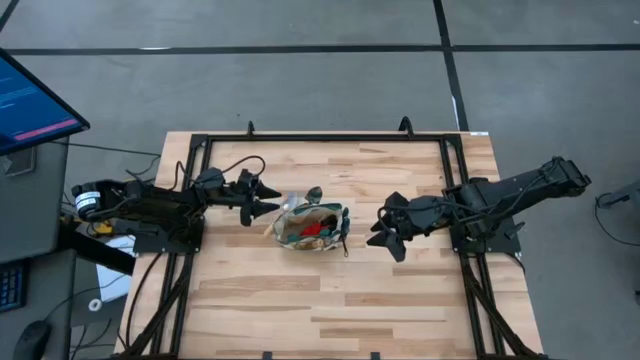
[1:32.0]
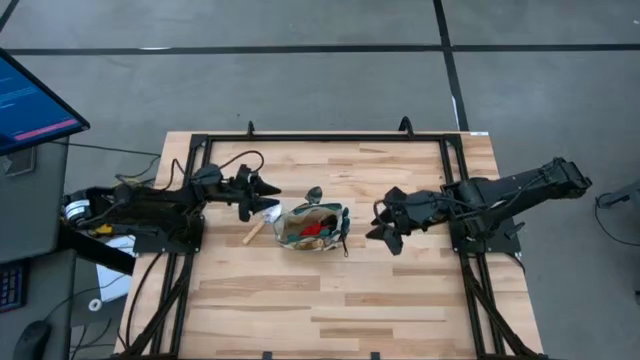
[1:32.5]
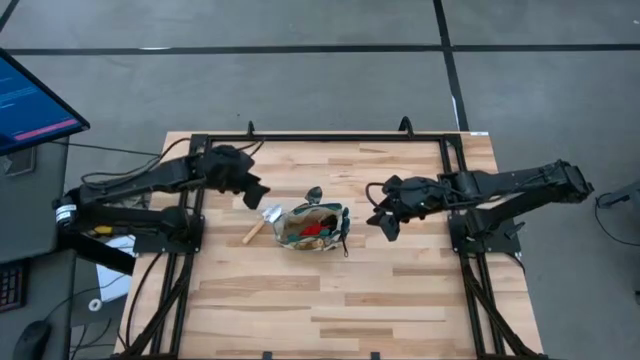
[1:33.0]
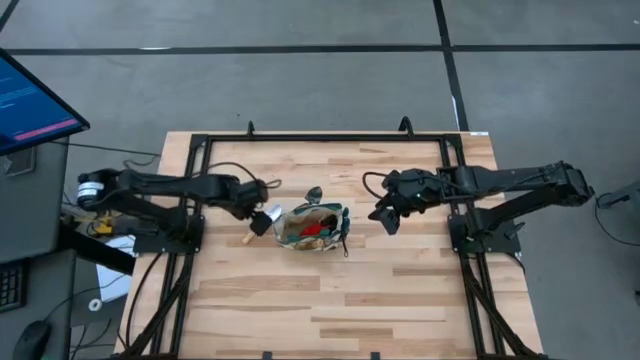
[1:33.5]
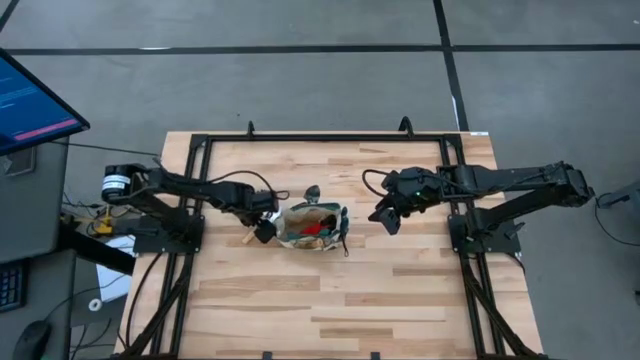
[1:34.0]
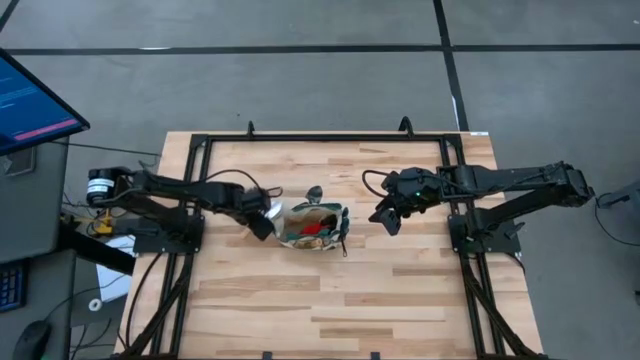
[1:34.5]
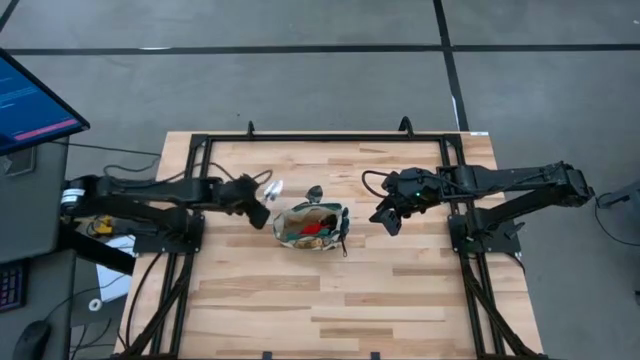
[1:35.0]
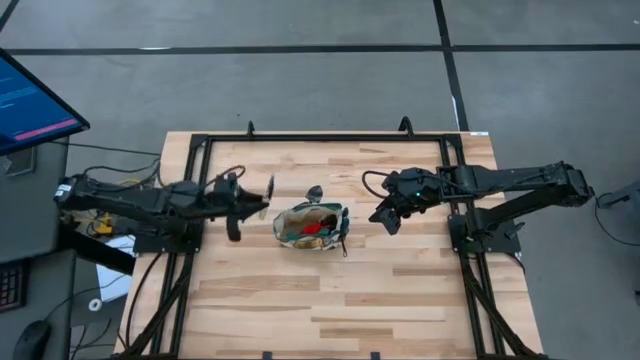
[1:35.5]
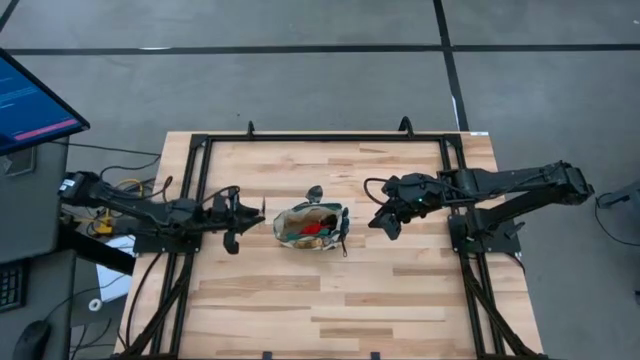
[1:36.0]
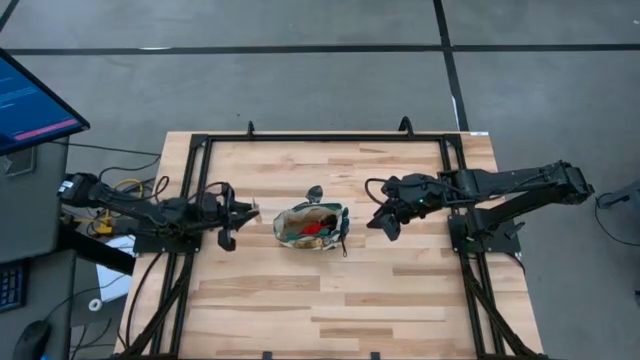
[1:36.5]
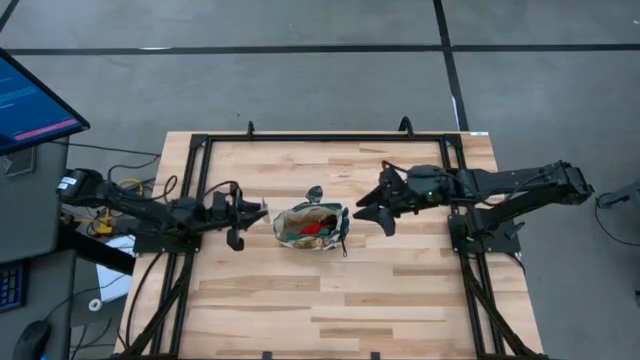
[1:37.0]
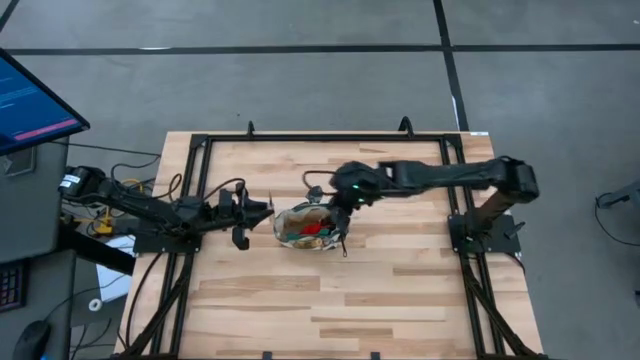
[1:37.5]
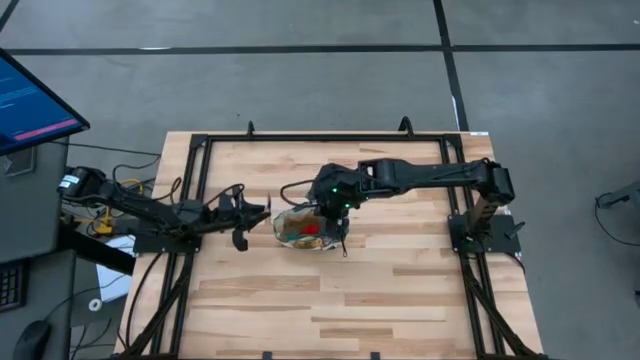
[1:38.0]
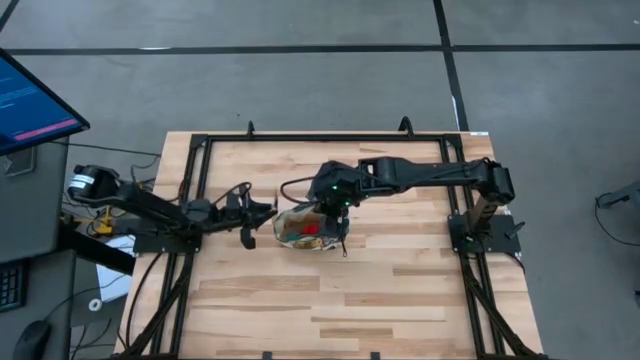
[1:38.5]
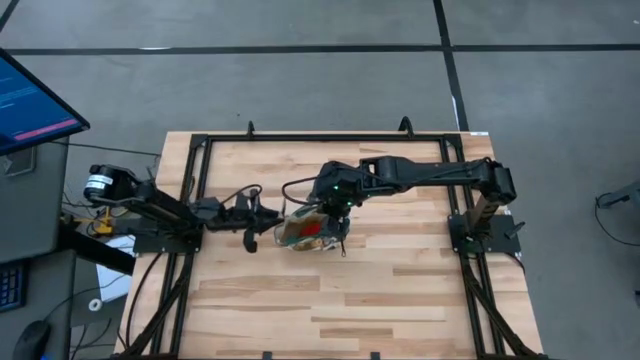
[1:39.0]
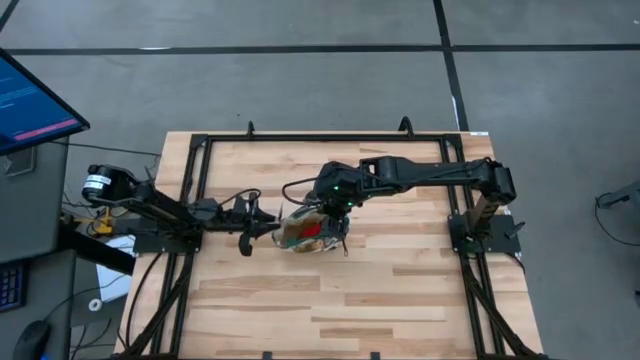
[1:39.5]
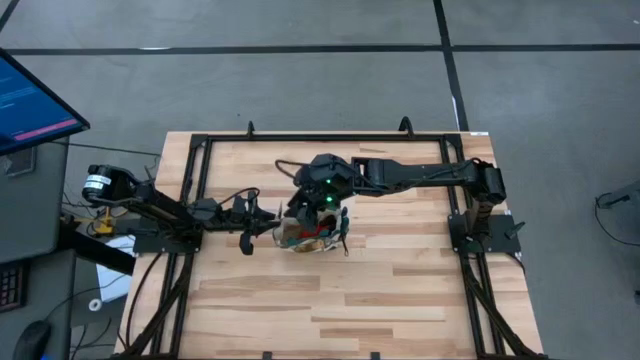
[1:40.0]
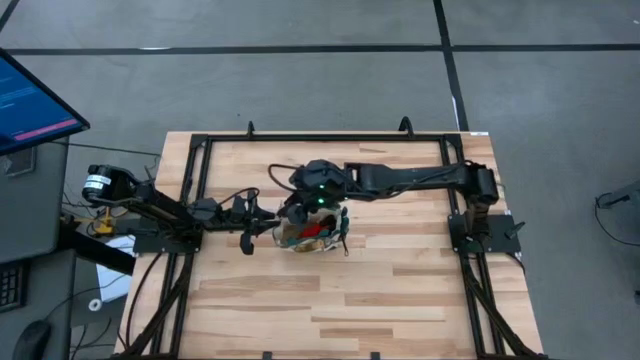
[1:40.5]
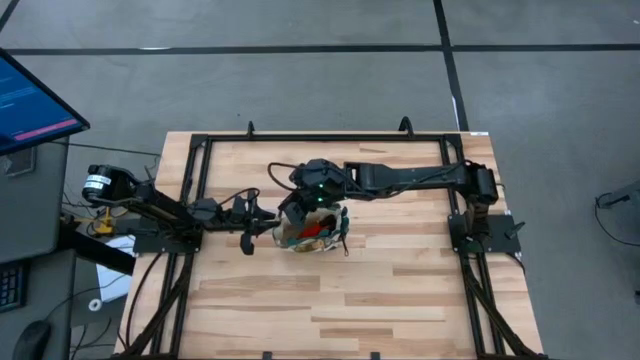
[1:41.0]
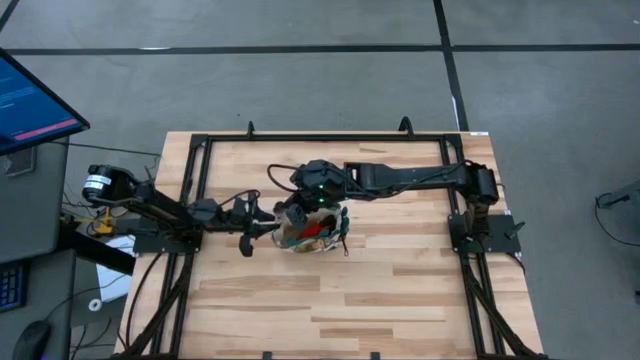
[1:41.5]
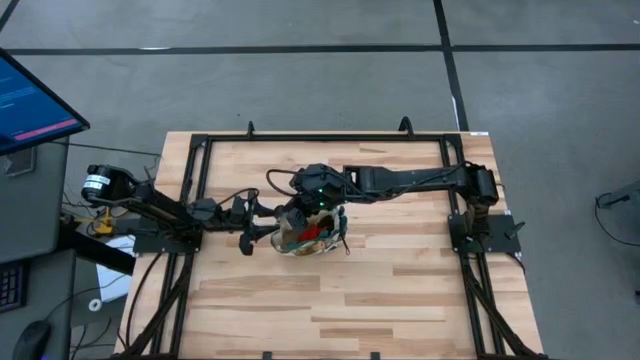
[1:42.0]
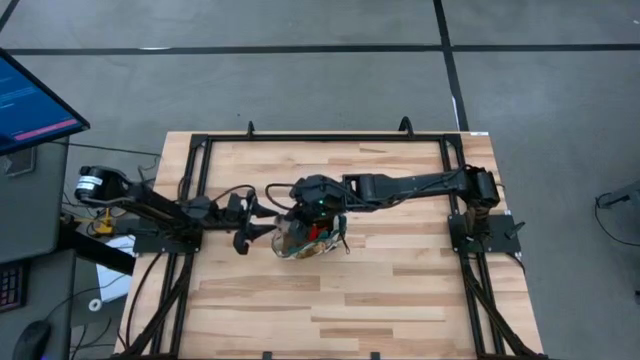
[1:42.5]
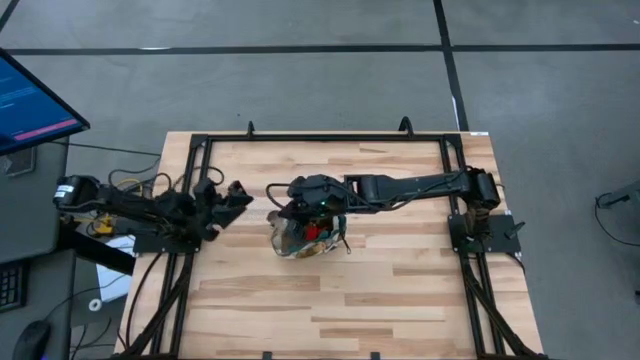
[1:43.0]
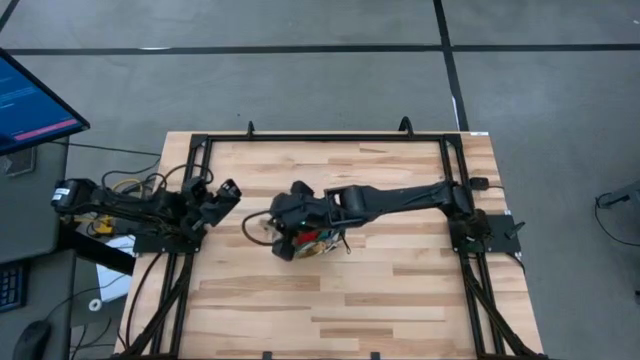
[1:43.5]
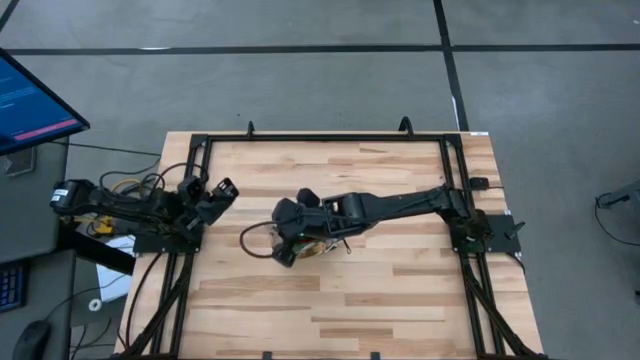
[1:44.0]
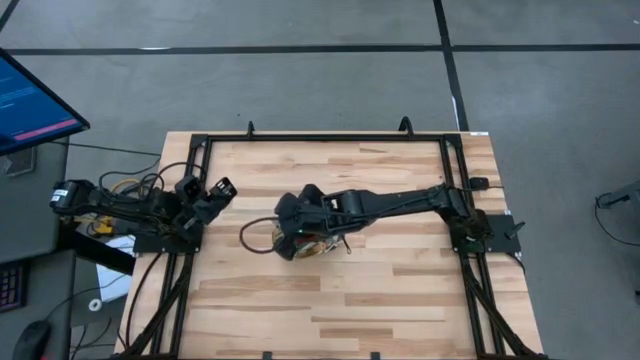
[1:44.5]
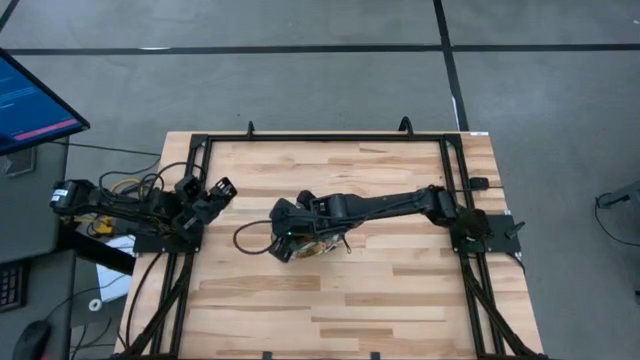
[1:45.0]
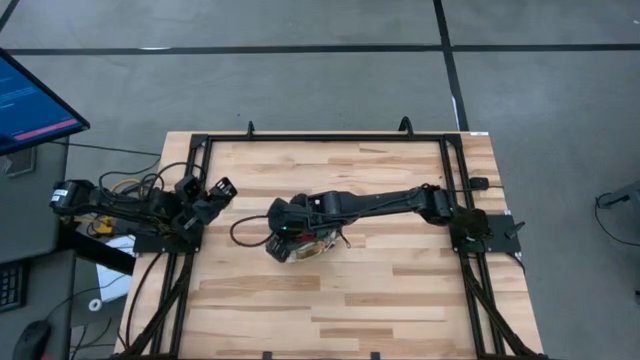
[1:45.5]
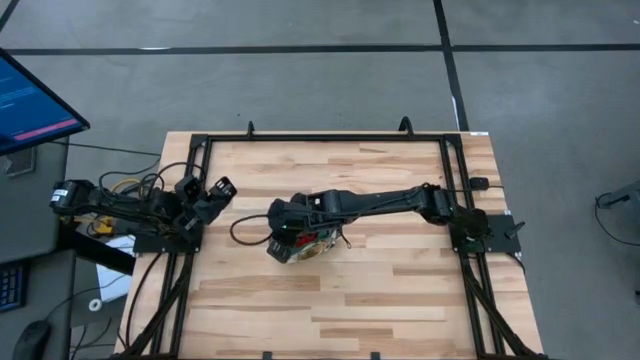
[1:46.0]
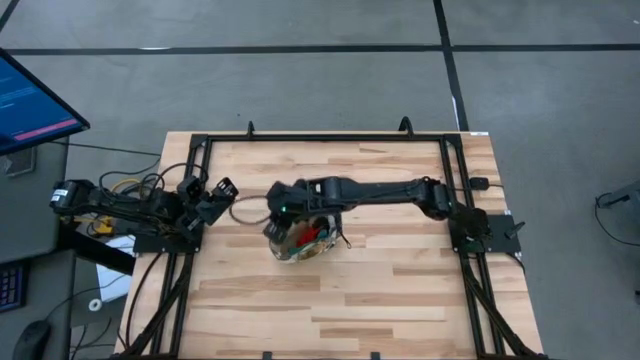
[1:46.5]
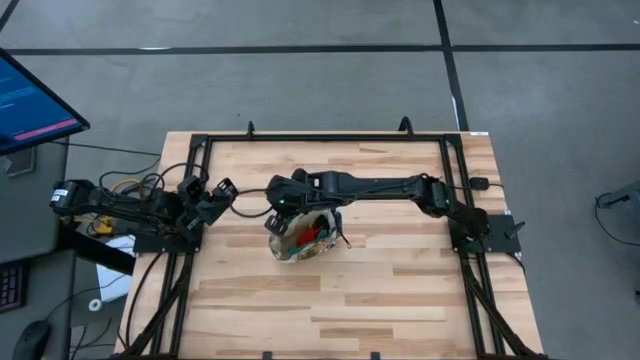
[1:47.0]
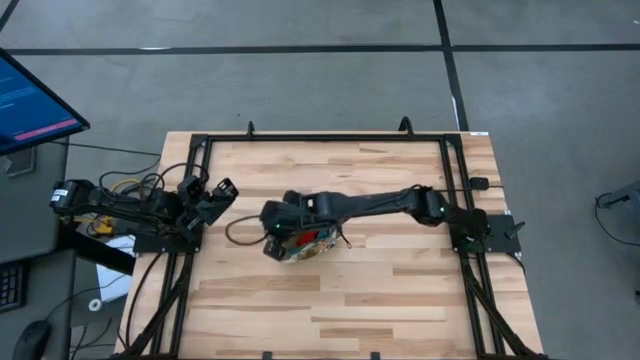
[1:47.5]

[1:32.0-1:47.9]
Task: Pick & Place Garden tools in Gardening bag
Put the brown trowel into the gardening bag

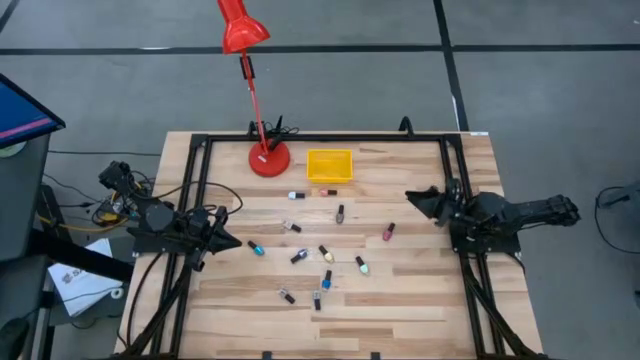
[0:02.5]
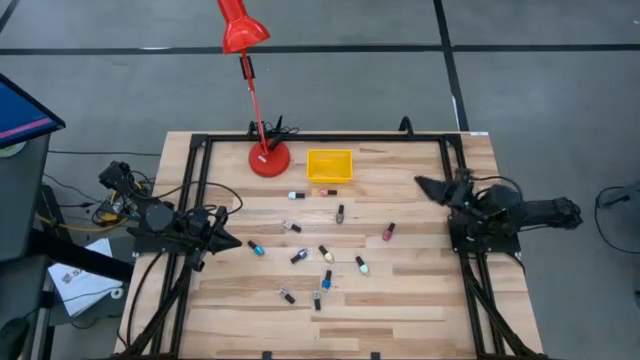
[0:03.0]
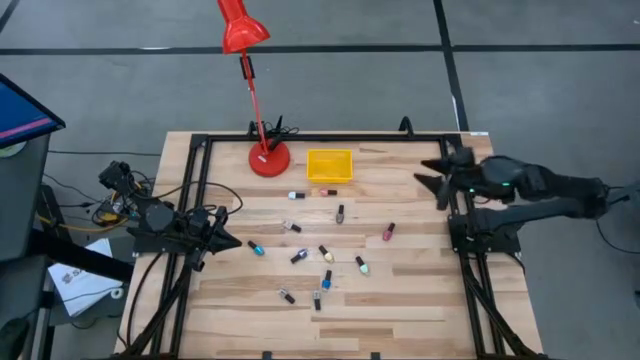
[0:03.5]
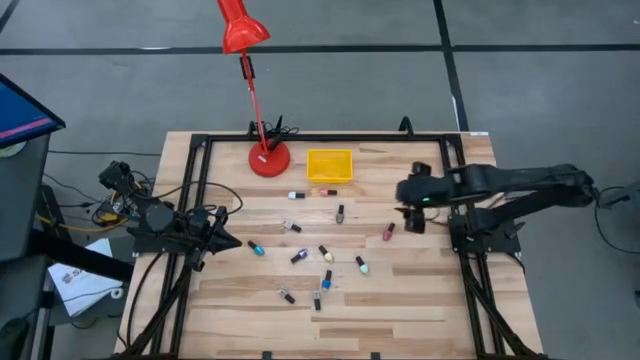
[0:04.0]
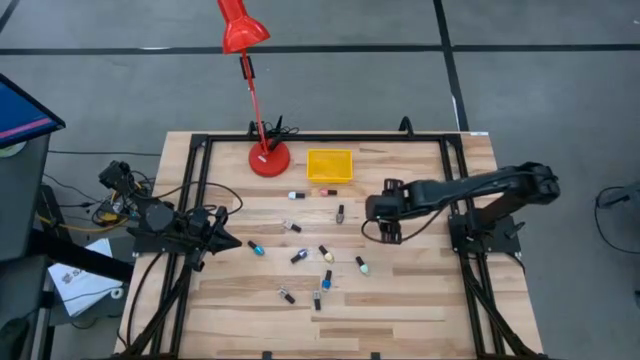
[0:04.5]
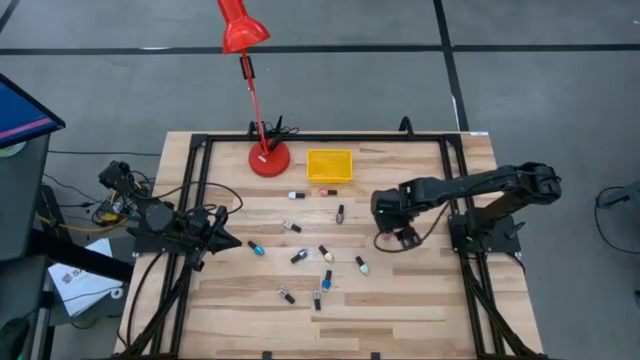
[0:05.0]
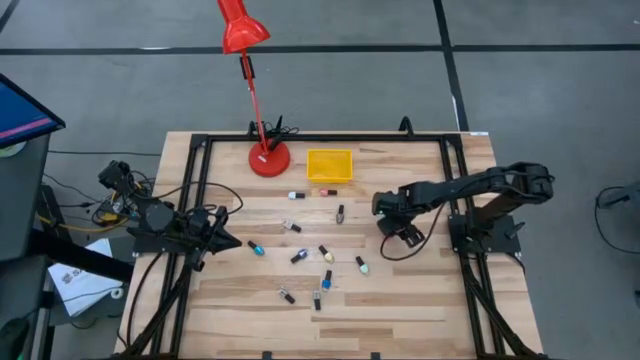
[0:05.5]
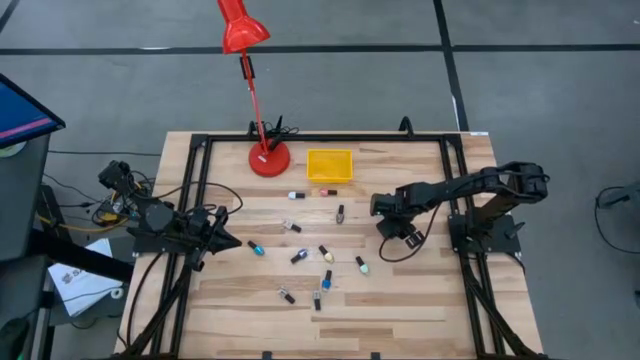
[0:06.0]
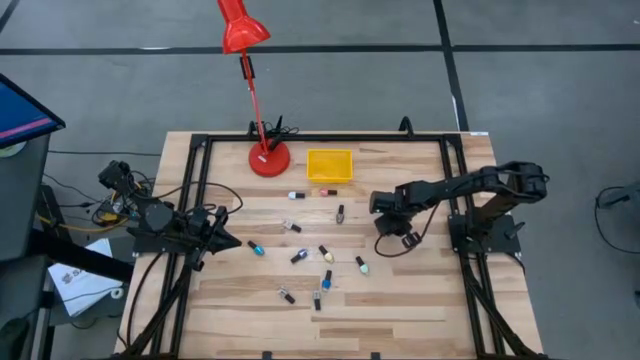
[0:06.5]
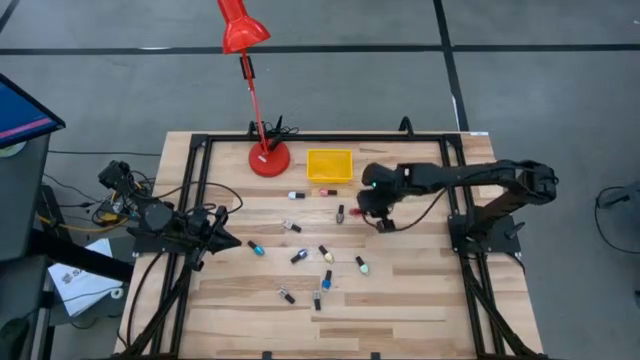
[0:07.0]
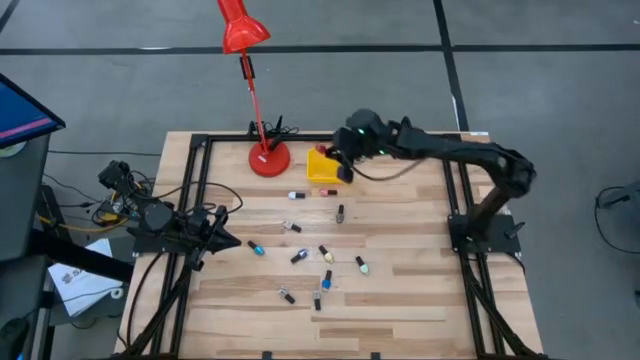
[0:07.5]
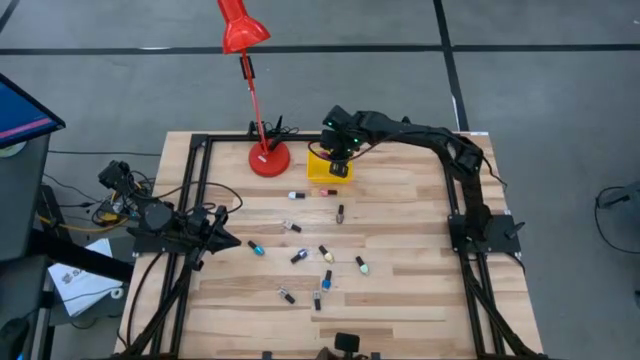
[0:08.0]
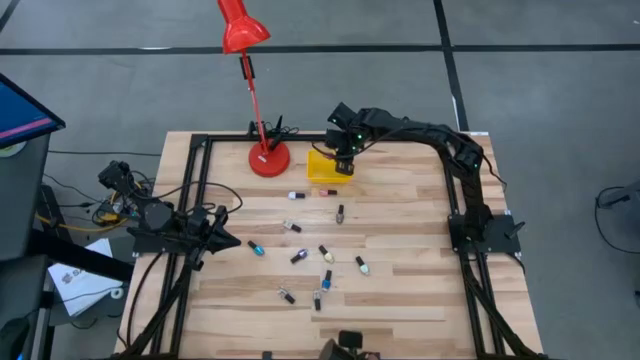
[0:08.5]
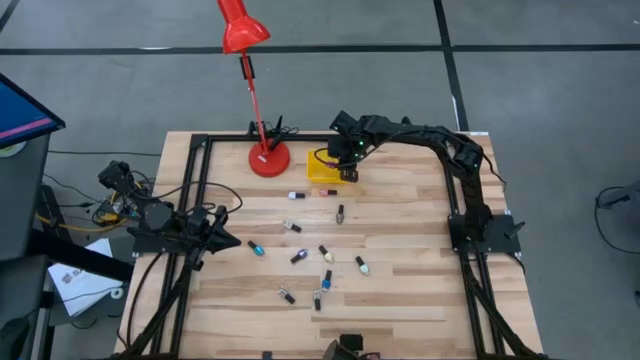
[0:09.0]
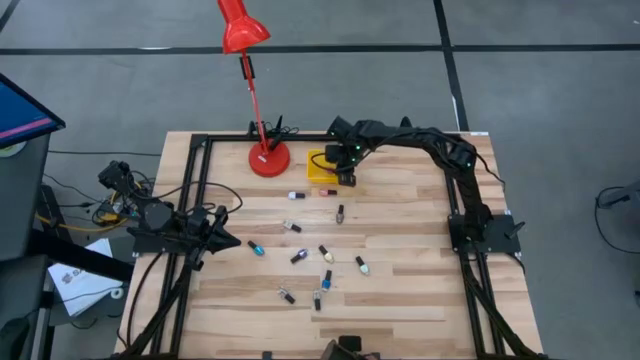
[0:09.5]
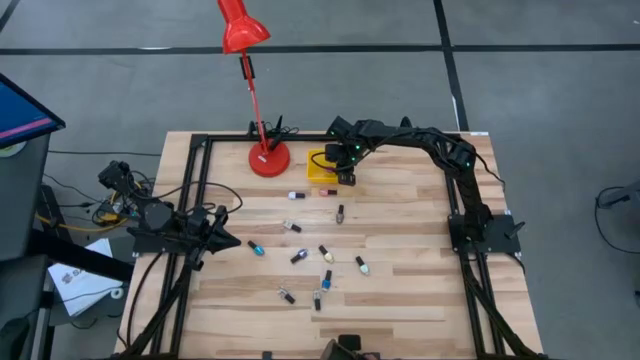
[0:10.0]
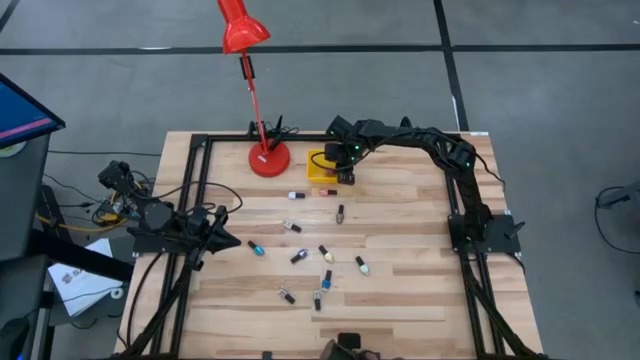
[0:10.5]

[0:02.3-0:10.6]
Task: Pick & Place Nail Polish
Put the red nail polish bottle into the yellow bin
